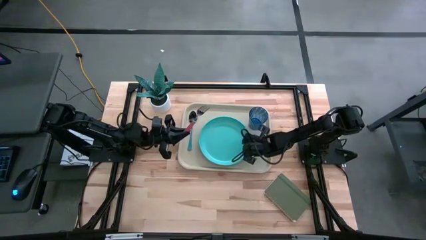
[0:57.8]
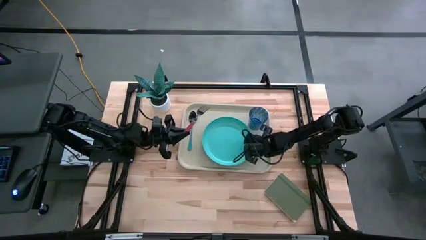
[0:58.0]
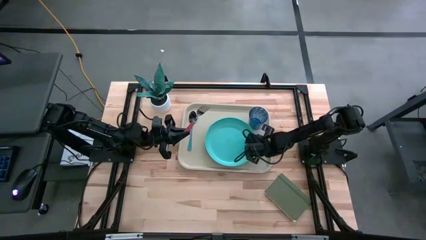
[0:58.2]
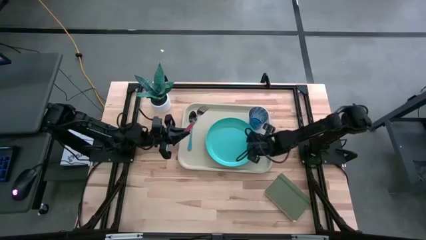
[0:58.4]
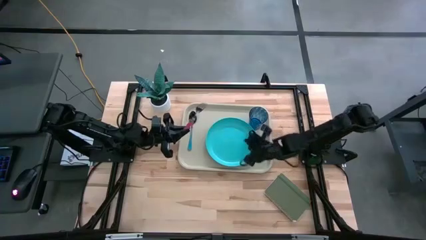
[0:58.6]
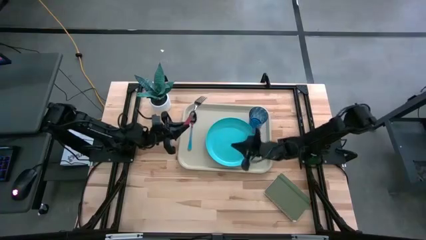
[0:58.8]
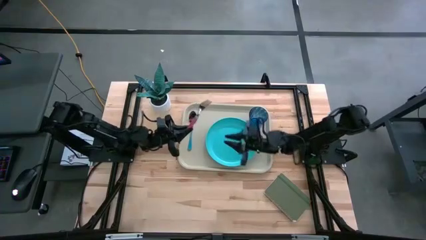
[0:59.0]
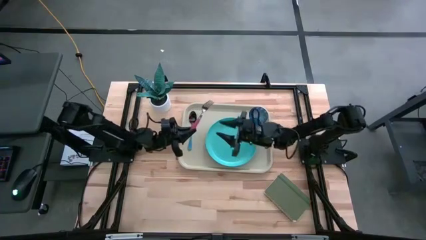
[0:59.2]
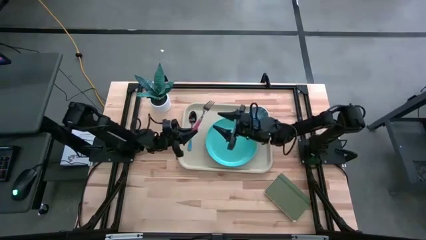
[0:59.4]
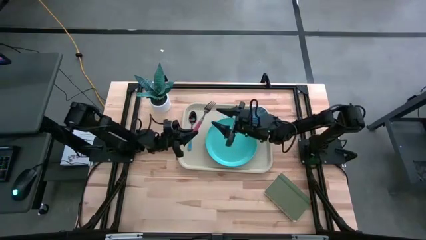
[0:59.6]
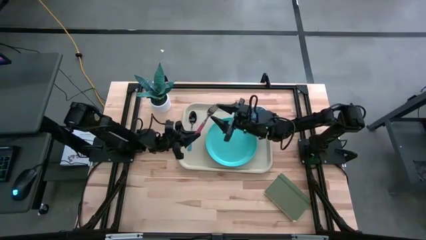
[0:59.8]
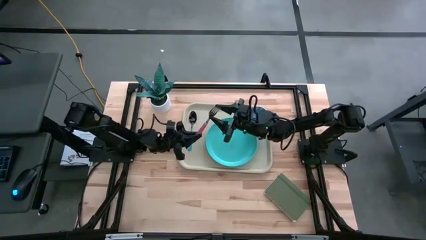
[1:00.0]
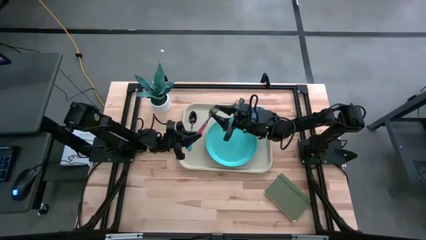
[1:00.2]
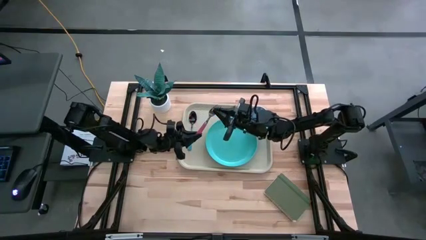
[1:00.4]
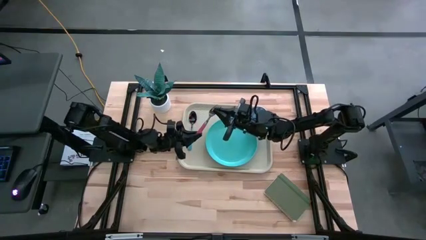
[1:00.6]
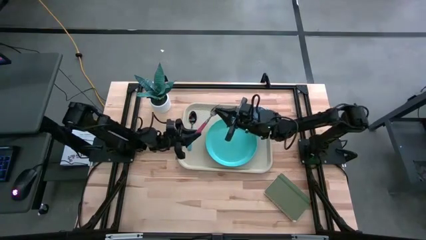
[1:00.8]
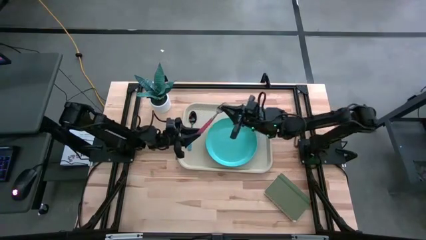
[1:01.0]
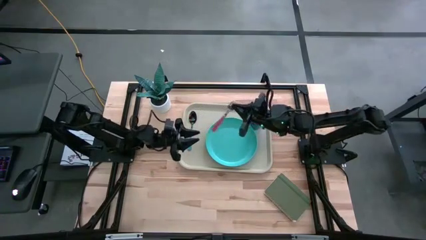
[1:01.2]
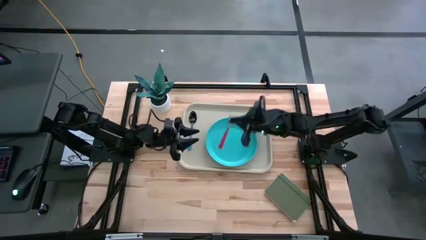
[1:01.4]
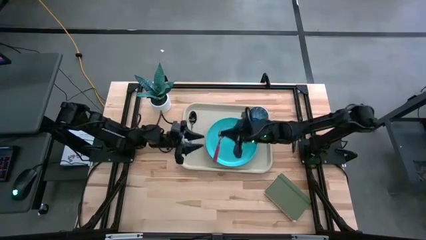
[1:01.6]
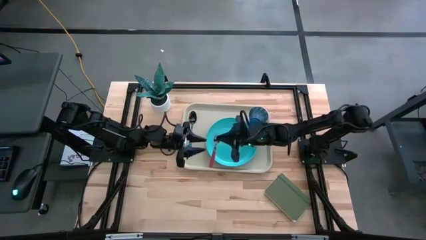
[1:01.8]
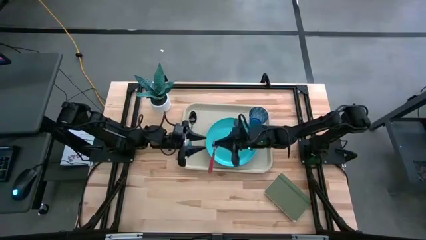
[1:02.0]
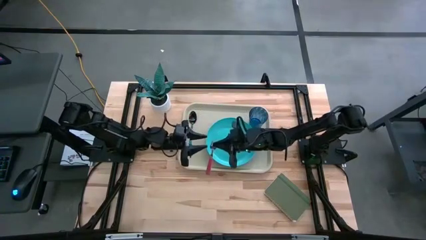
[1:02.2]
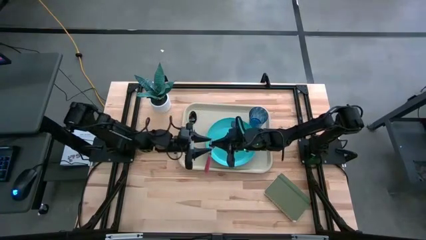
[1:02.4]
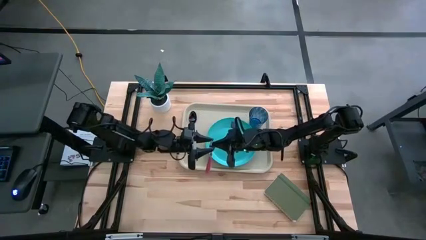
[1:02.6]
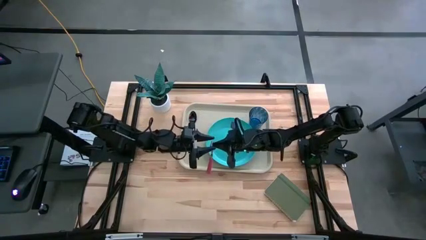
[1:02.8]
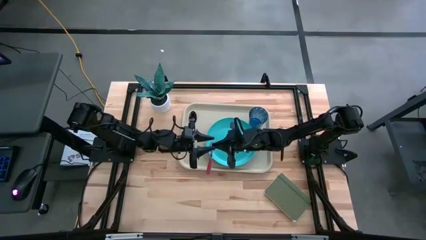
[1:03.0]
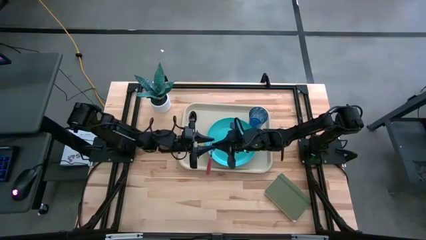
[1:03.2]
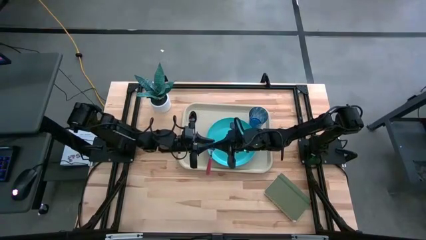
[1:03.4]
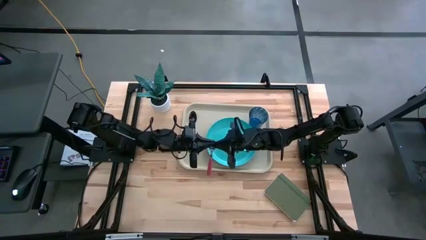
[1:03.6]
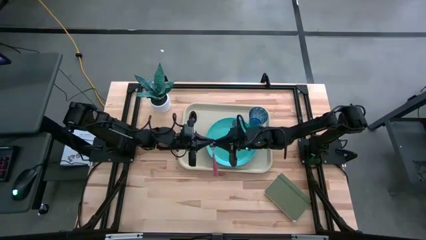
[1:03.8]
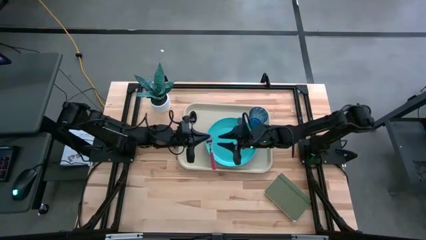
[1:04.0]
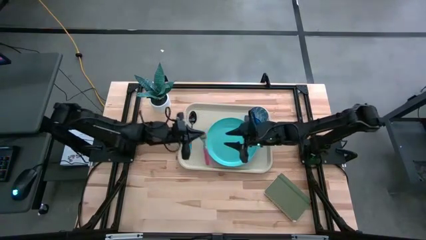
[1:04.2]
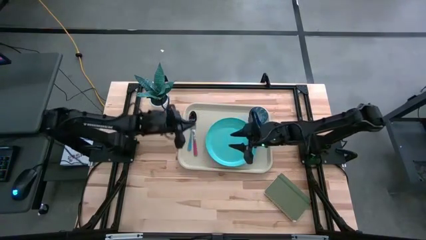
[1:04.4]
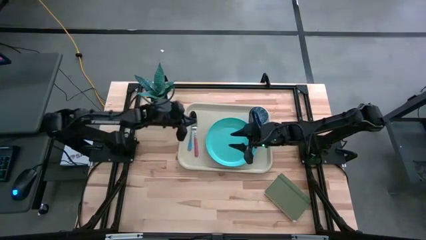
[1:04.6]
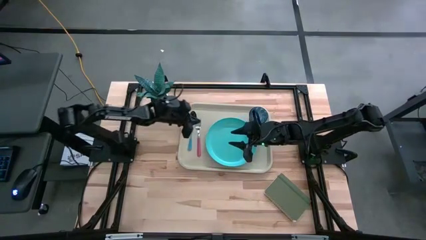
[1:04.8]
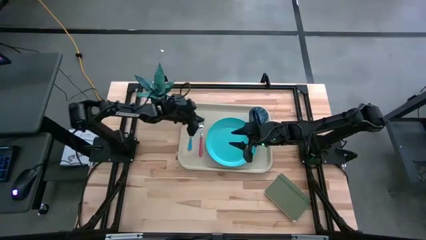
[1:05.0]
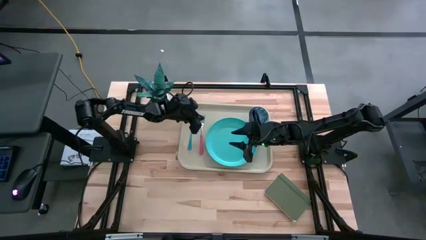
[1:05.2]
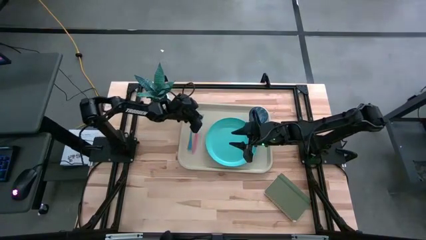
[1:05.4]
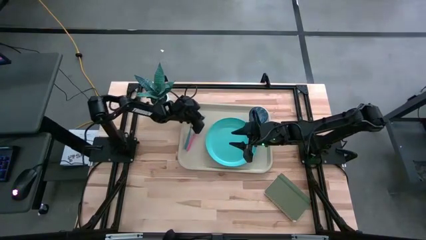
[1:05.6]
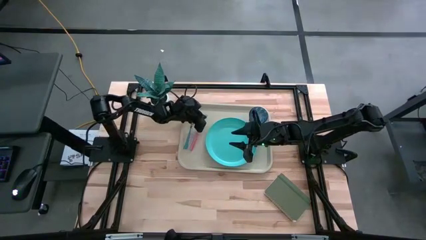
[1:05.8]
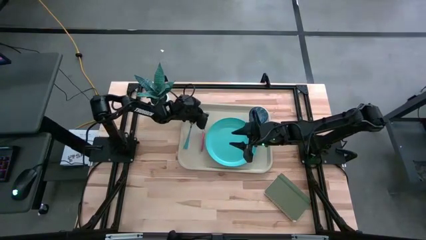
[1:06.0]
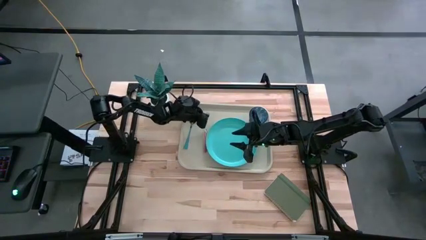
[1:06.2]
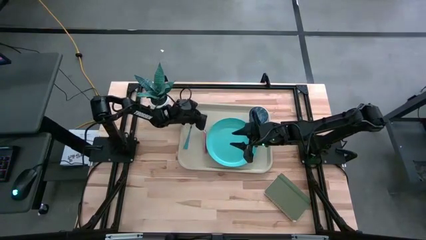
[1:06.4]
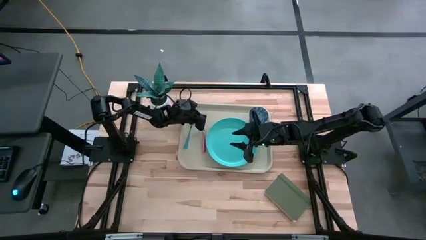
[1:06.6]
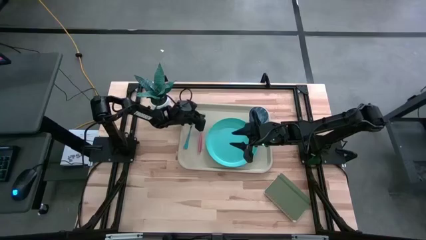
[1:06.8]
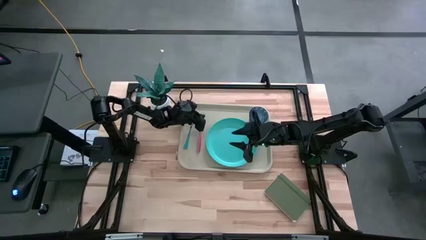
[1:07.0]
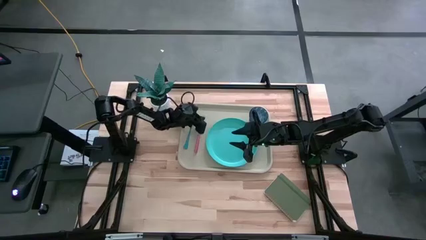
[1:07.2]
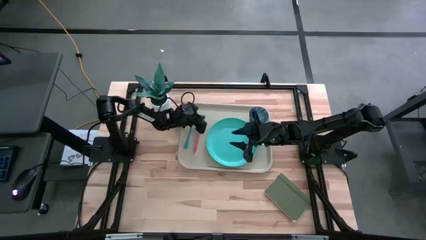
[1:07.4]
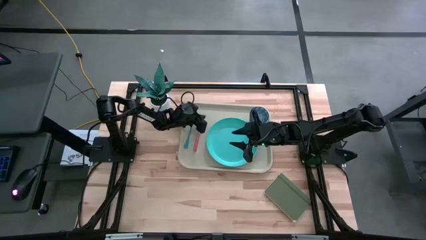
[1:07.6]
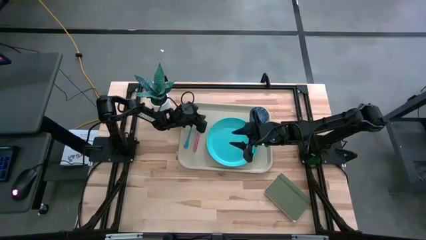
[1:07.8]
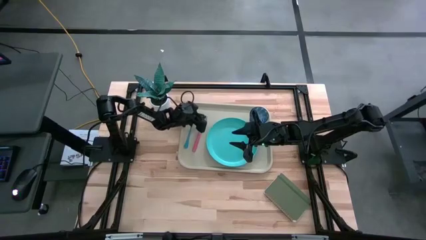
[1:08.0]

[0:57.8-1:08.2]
Task: Pick and place plate/cup/fork/spoon on tray
Put the red fork to the right of the blue spoon on the light brown serving tray

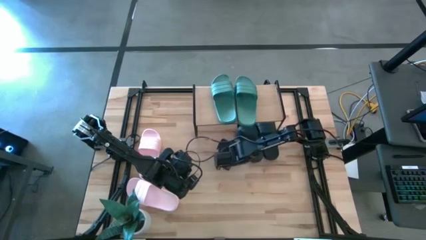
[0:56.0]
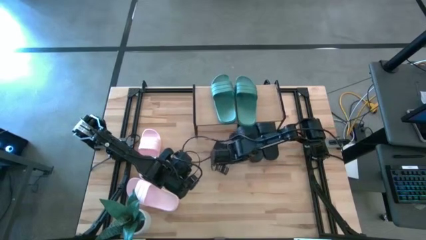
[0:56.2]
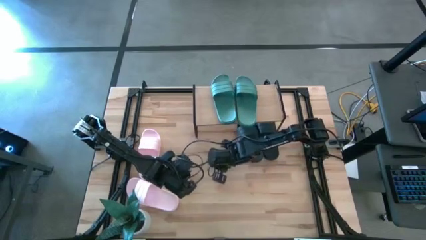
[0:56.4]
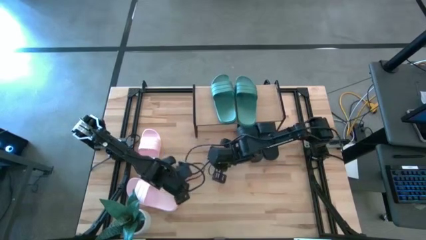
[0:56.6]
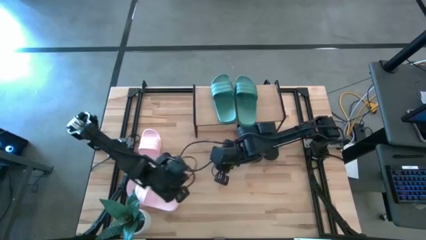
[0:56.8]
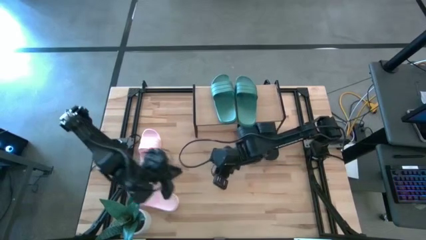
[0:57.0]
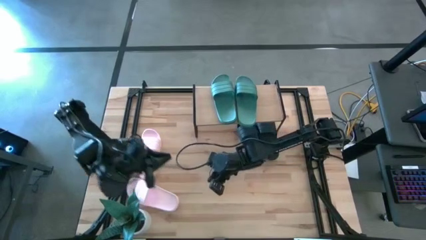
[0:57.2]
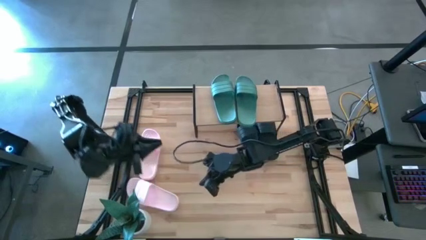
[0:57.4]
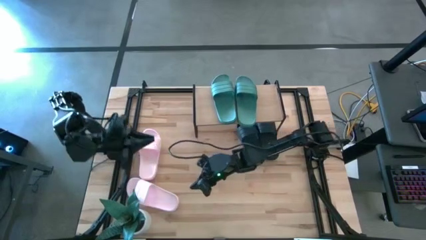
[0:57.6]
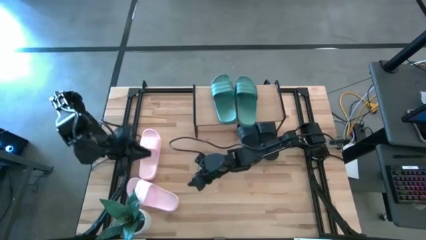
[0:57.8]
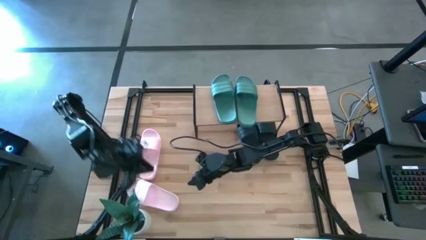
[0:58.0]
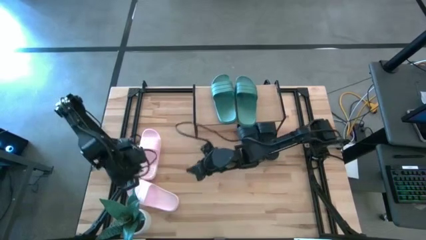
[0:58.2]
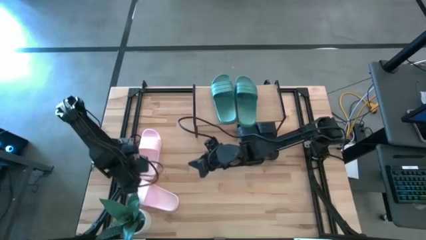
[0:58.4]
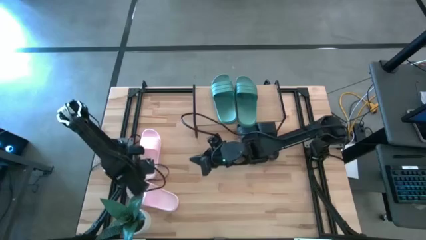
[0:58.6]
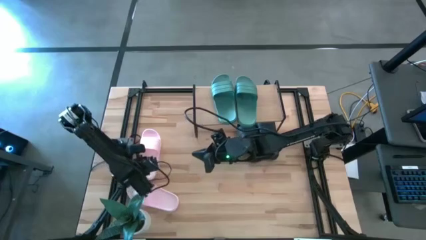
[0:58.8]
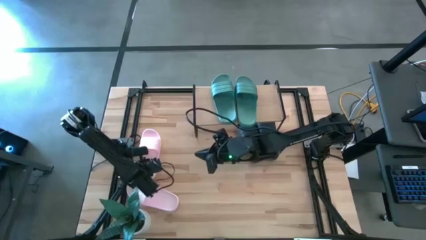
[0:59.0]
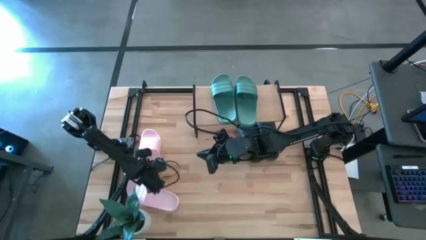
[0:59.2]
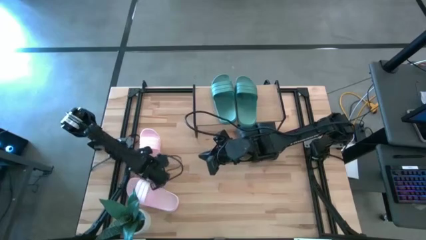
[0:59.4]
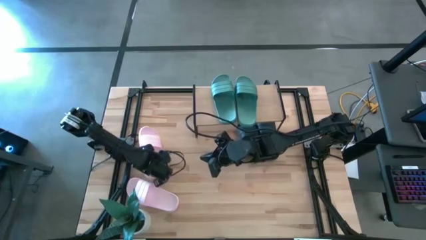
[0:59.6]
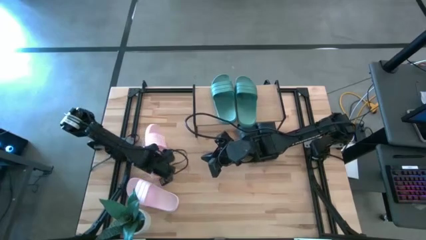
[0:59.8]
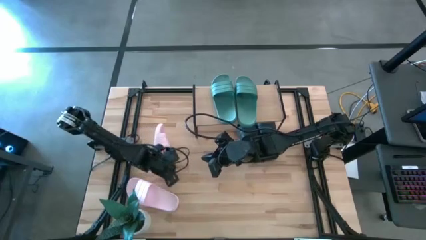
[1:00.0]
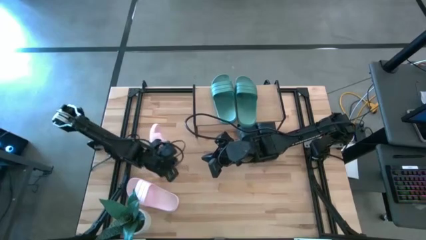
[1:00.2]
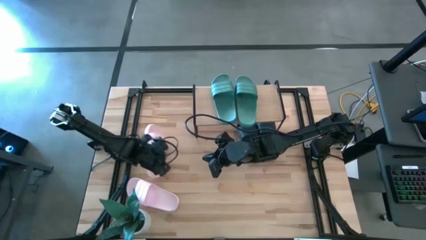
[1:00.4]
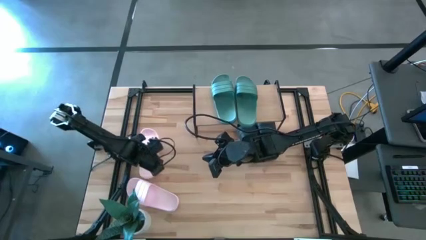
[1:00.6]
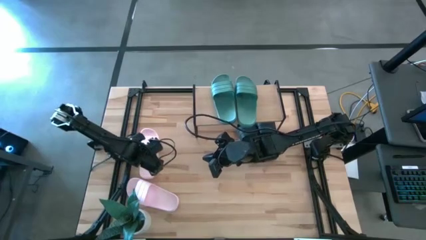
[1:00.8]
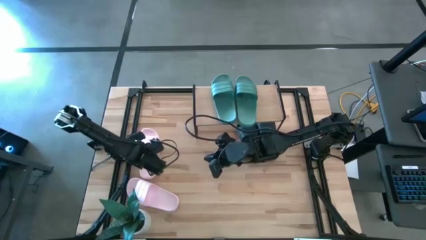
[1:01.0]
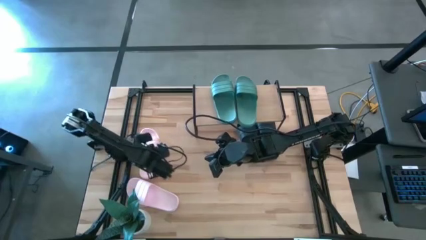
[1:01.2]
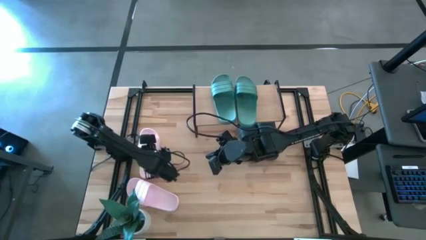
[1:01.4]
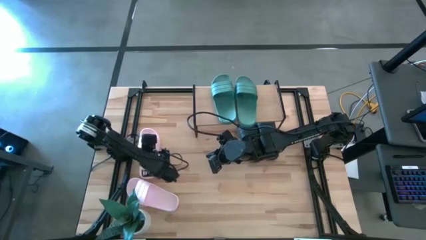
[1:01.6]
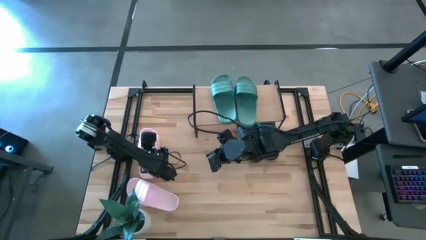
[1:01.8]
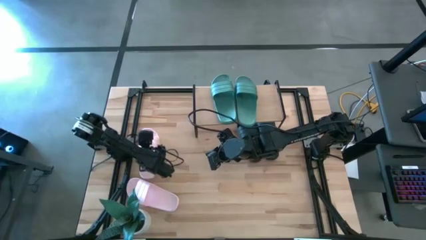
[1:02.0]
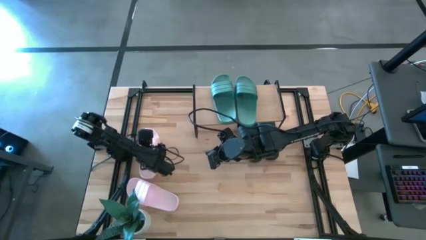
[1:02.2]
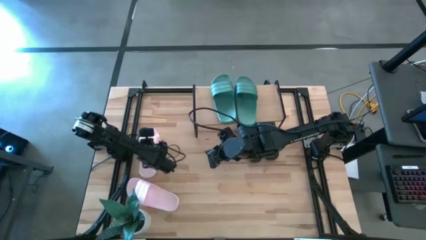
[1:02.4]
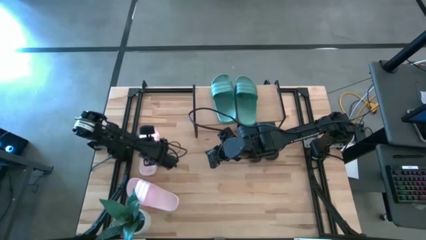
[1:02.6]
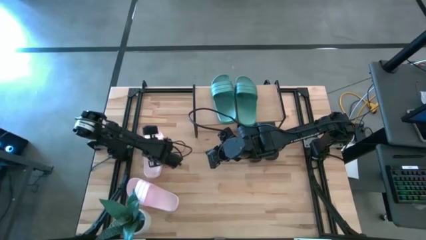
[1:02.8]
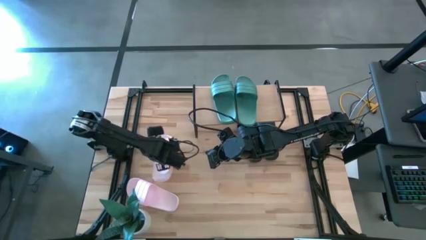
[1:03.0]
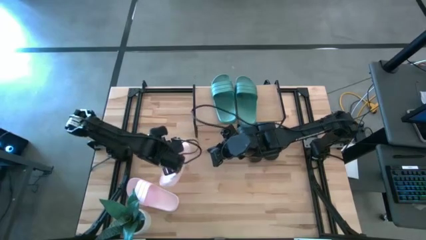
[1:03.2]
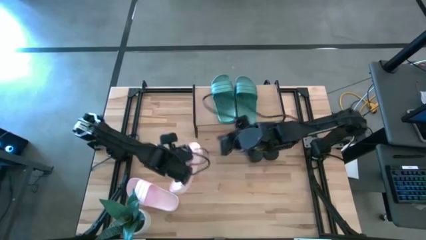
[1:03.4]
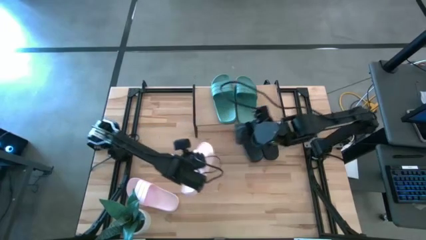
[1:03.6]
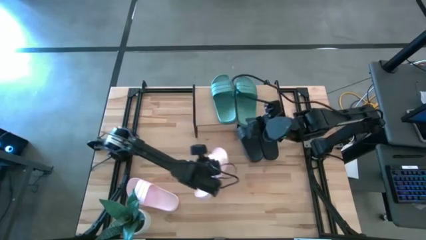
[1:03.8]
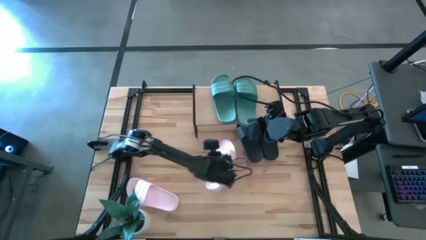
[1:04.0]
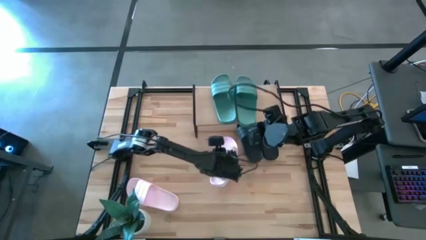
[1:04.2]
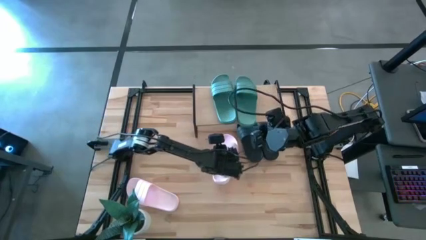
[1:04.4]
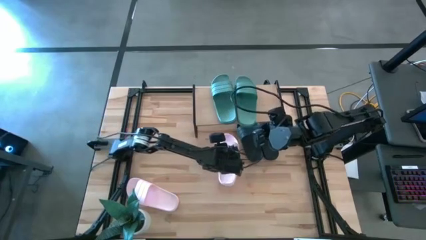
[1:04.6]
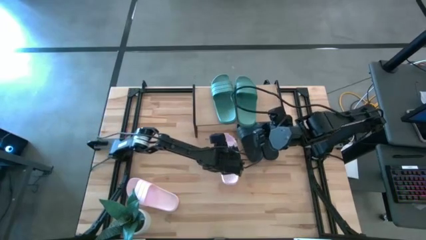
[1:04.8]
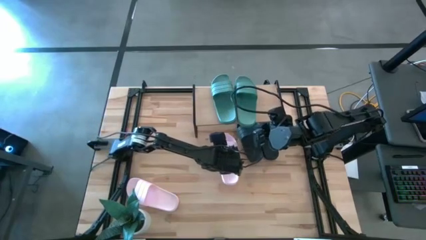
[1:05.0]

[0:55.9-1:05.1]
Task: Pick and place slides into the shelf
Put the top pink slides under the shelf
